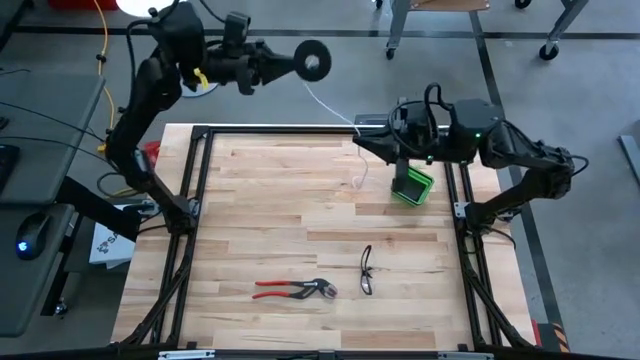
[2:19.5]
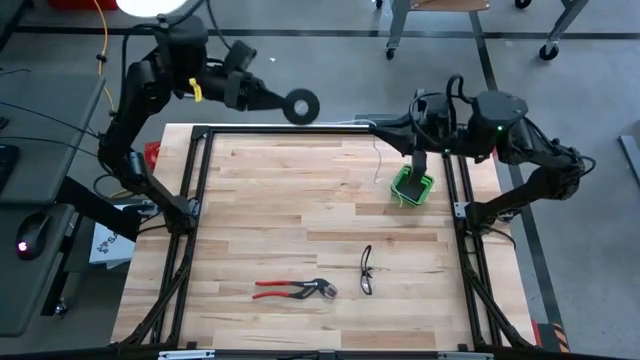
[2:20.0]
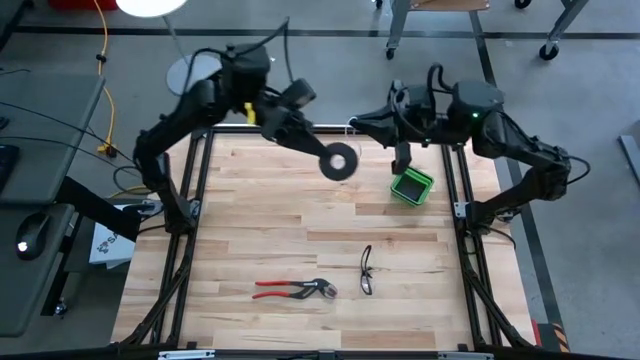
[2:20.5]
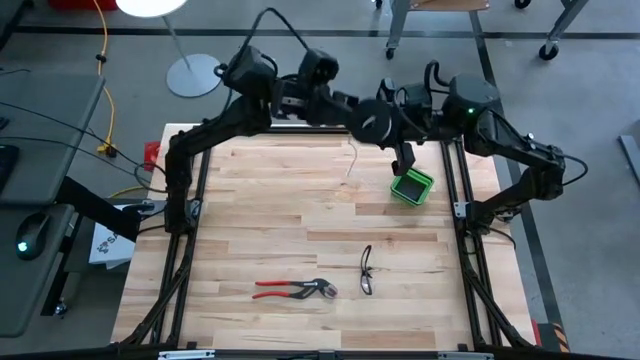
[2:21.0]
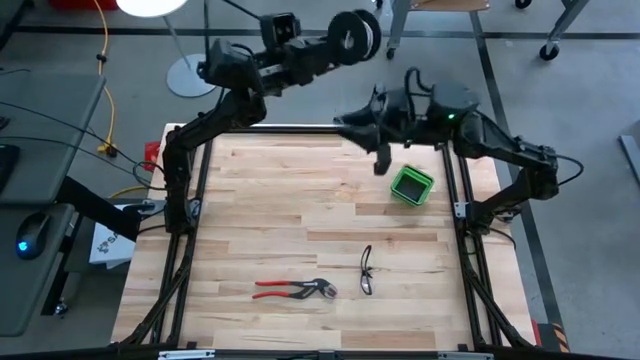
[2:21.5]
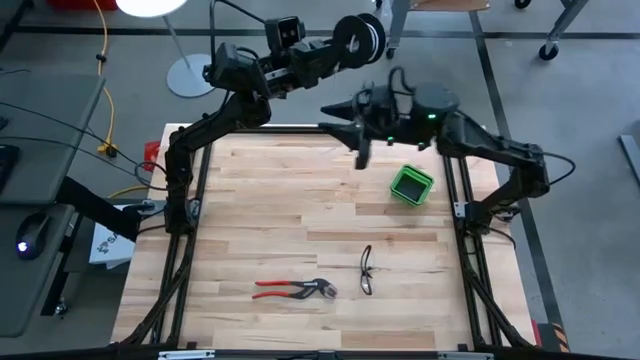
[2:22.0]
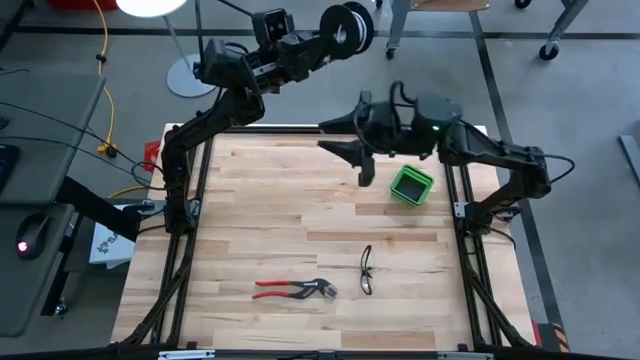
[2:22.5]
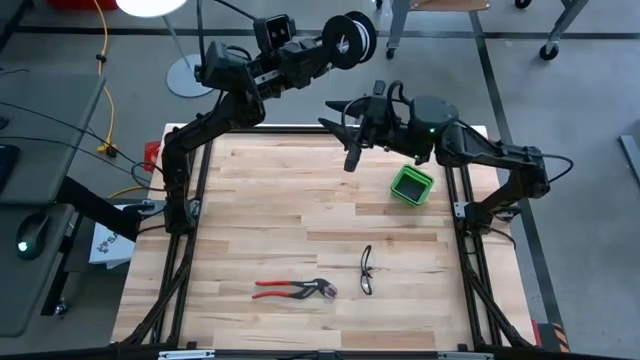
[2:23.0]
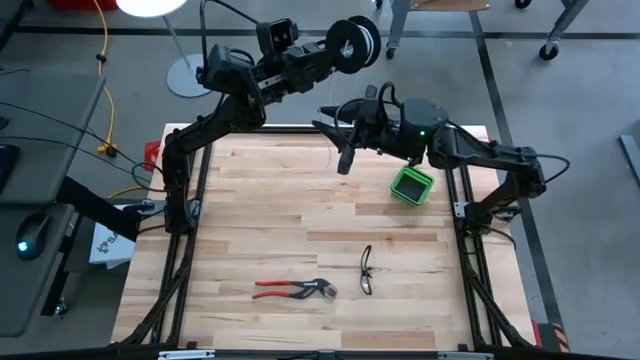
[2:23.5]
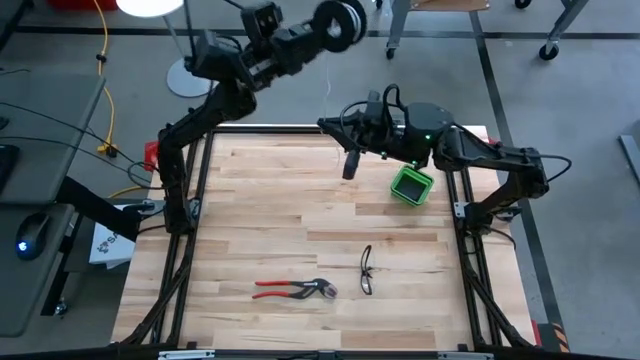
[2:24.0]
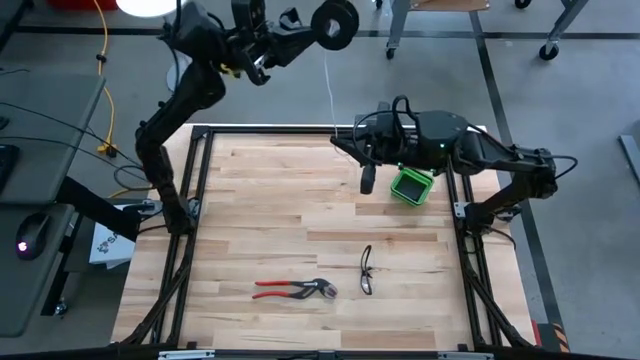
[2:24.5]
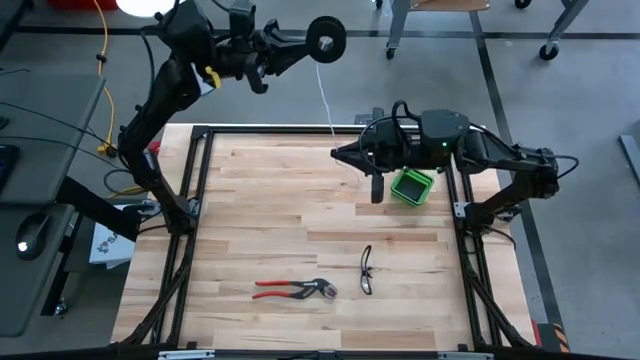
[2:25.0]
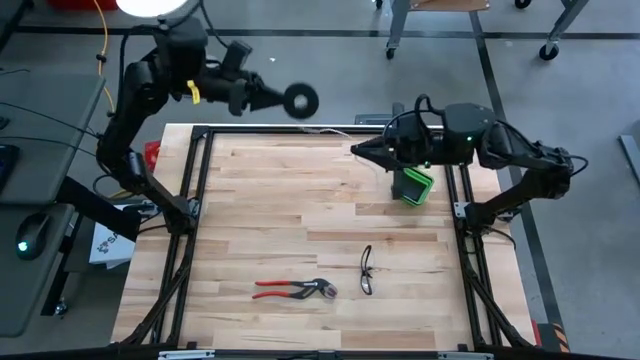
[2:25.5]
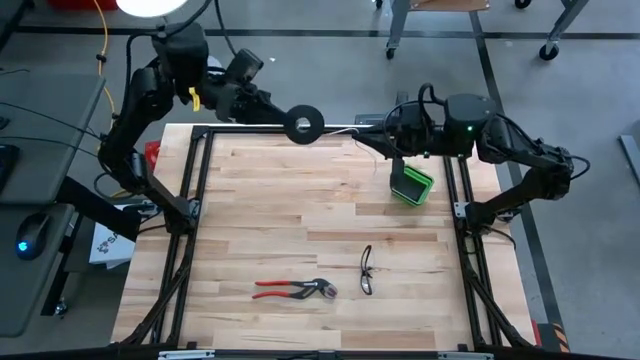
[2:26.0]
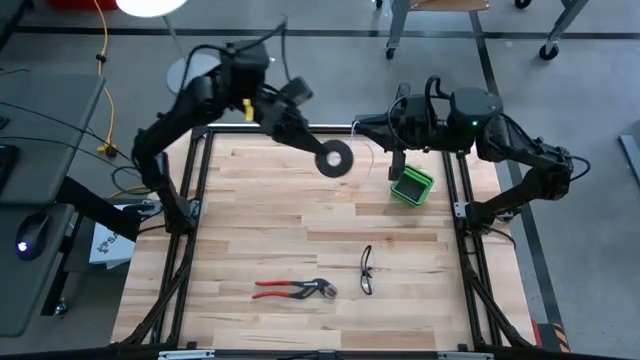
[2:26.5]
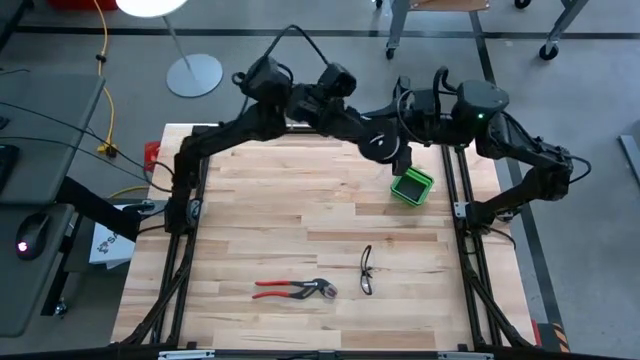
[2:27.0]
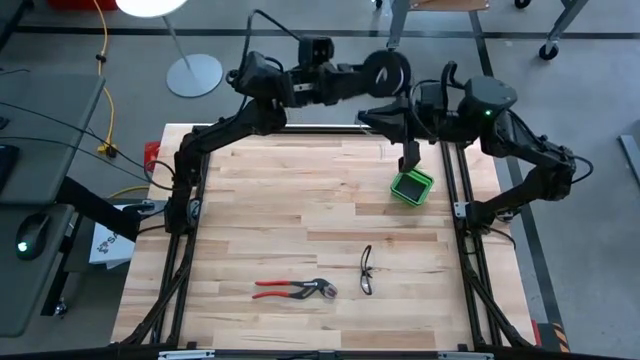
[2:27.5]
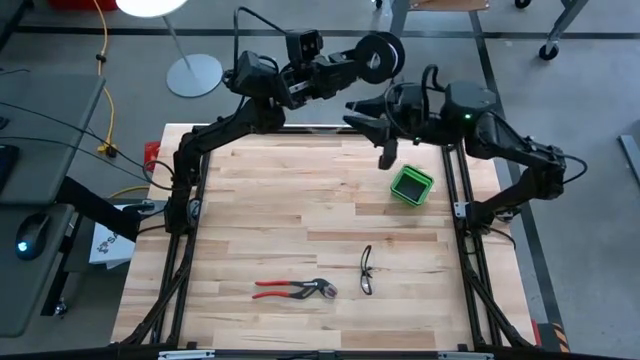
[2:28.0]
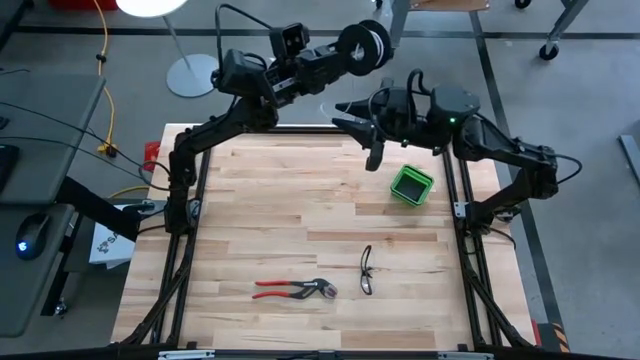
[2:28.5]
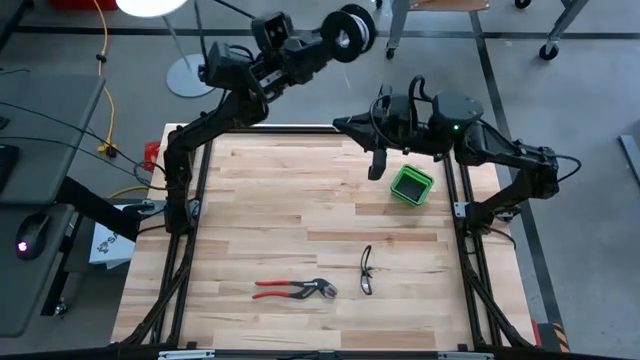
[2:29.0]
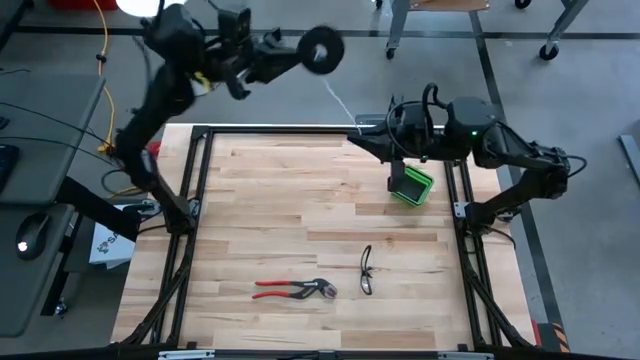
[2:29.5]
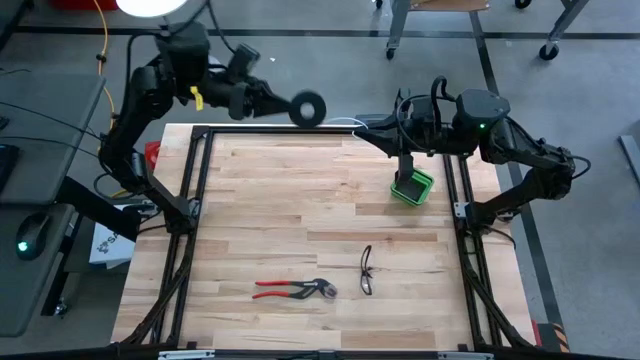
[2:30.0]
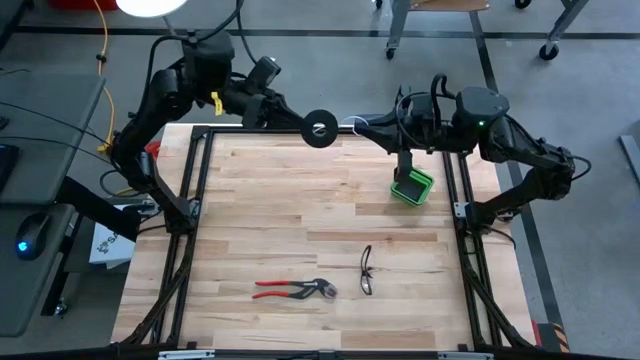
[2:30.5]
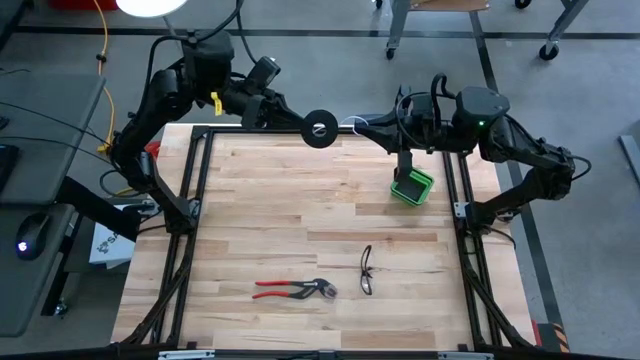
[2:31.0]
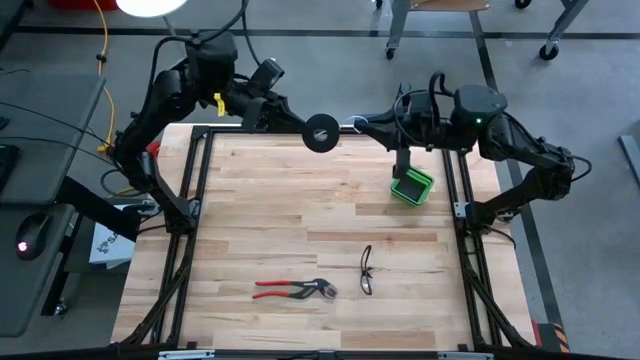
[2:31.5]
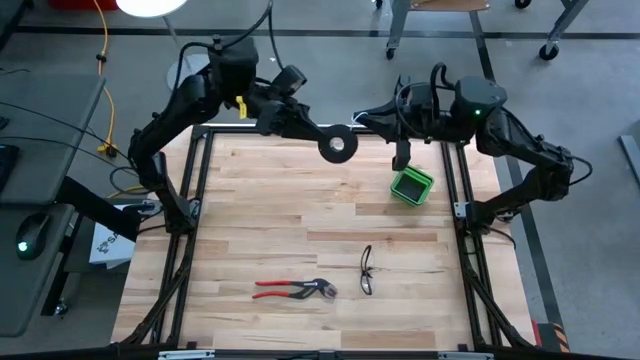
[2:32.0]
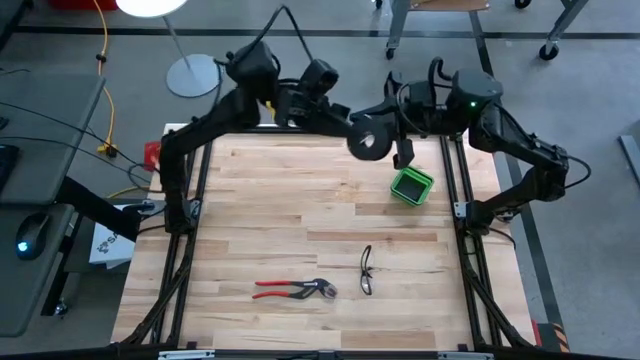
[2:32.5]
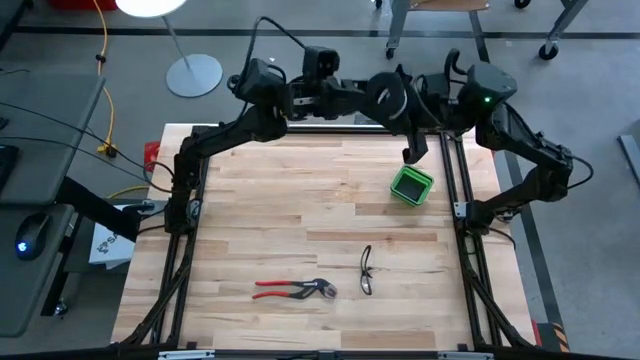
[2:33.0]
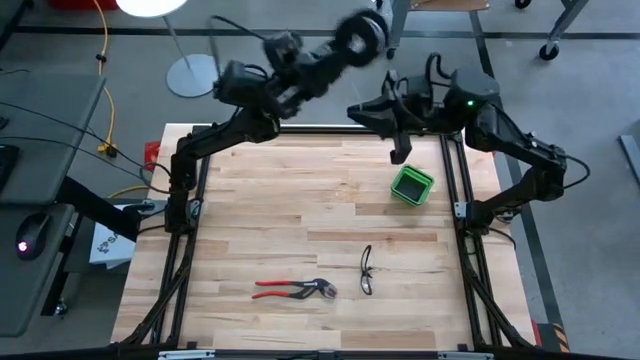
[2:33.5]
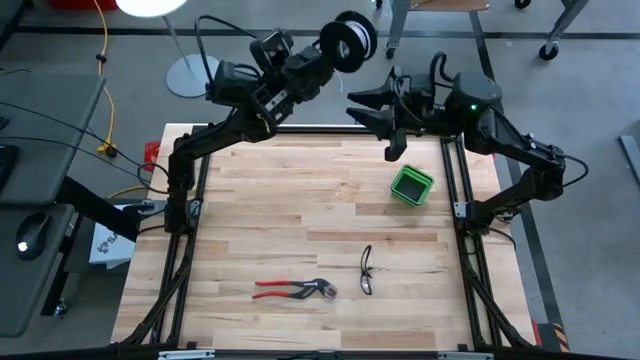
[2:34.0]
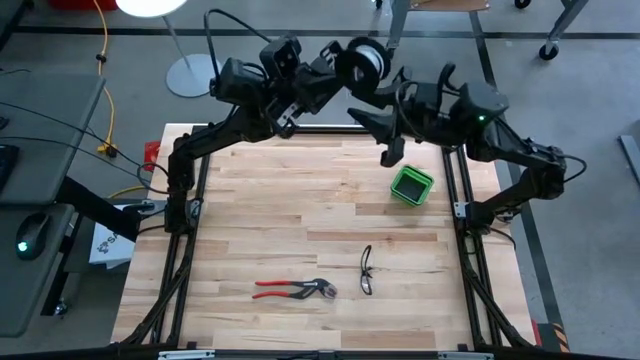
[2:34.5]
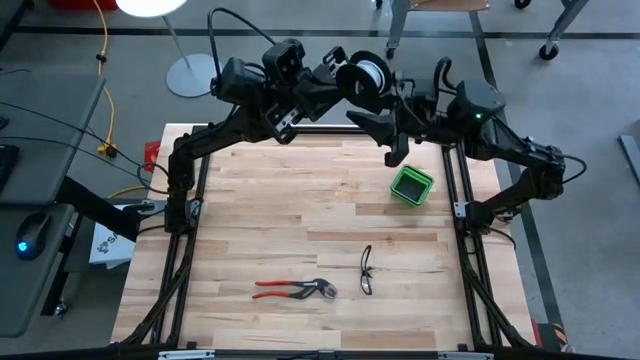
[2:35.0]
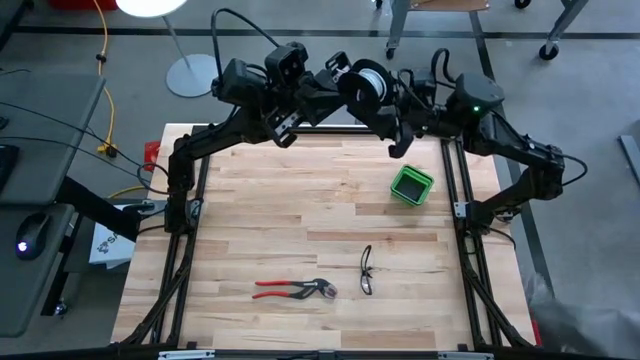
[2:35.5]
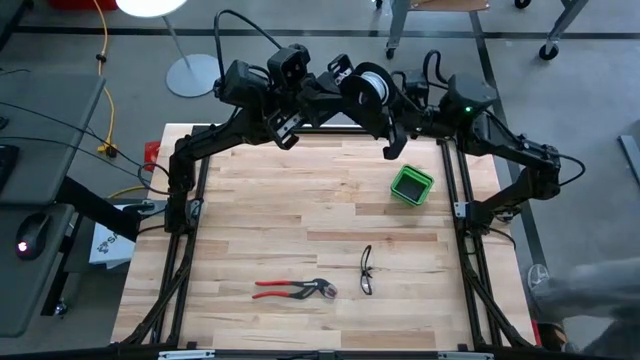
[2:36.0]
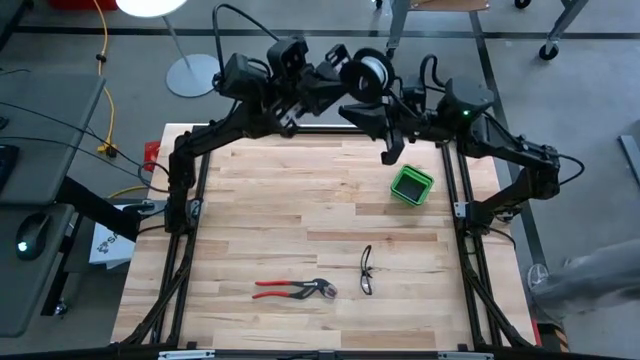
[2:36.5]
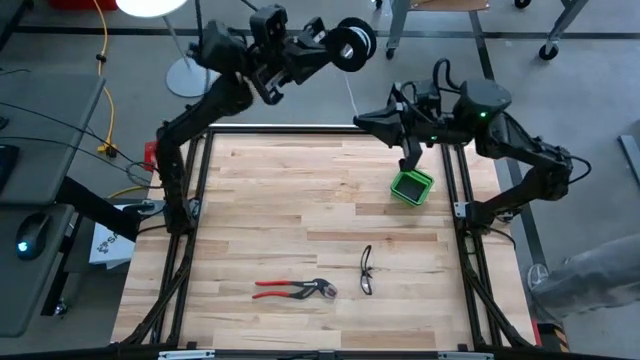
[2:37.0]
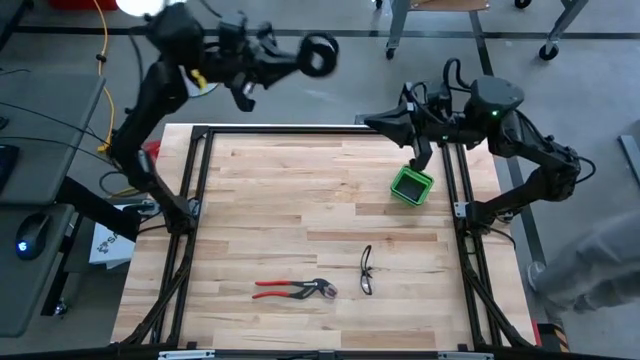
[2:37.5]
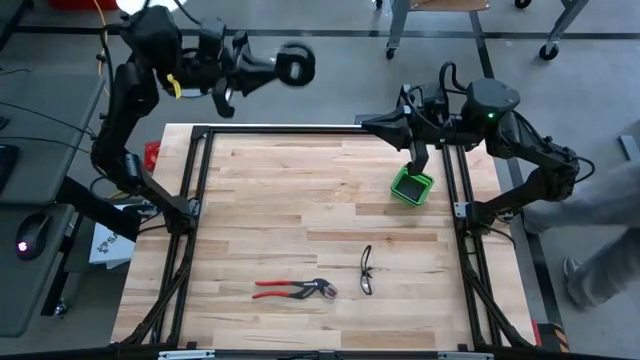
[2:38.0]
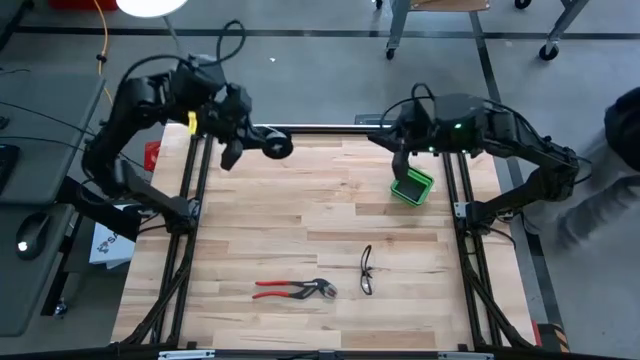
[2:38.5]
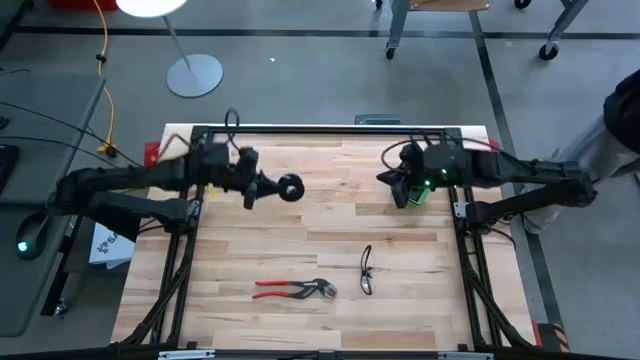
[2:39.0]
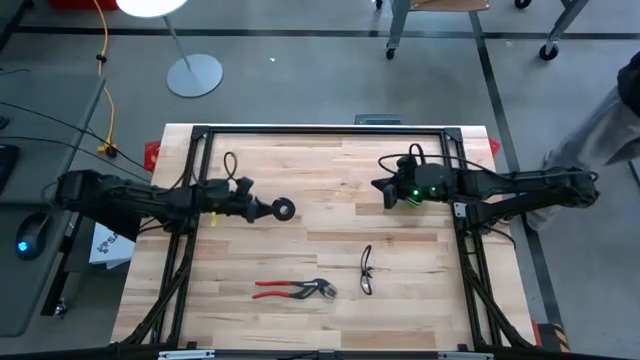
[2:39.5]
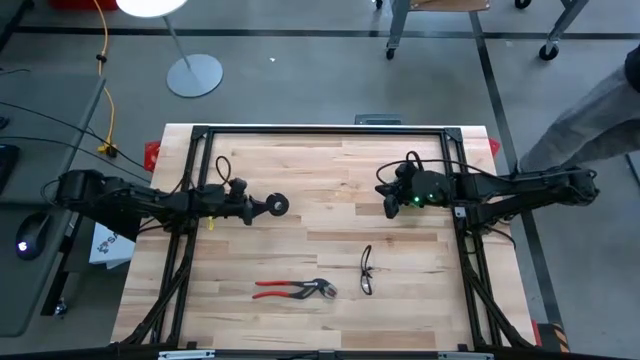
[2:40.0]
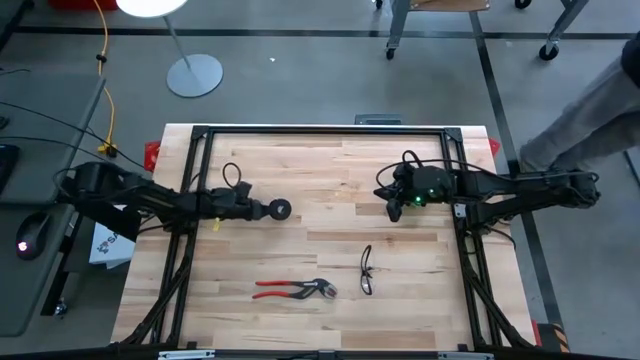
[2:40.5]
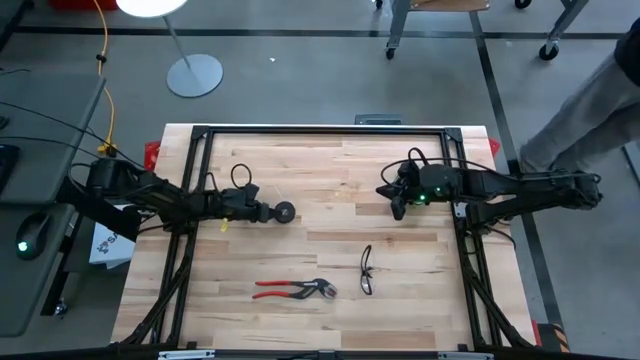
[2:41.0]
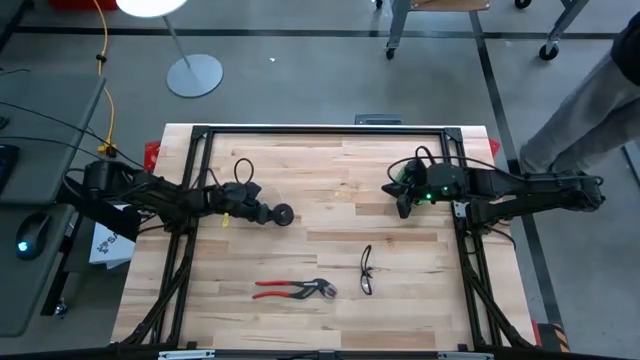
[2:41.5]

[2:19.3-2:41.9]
Task: Coil cords
Coil the wire into the spool
